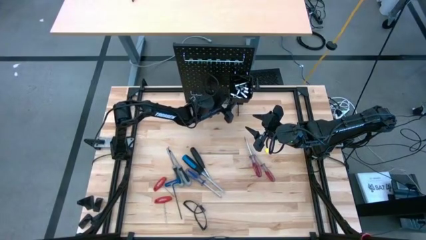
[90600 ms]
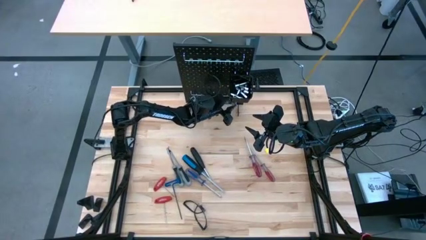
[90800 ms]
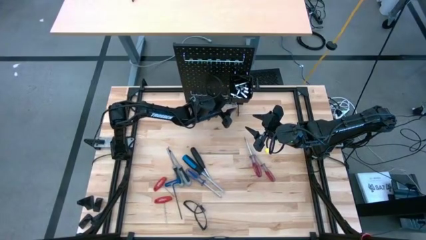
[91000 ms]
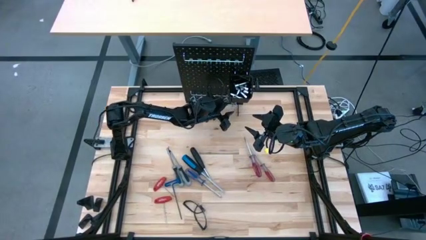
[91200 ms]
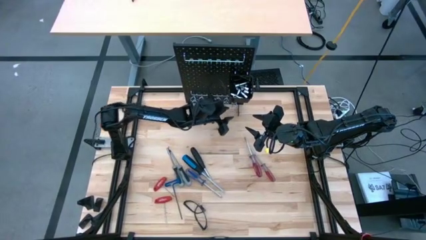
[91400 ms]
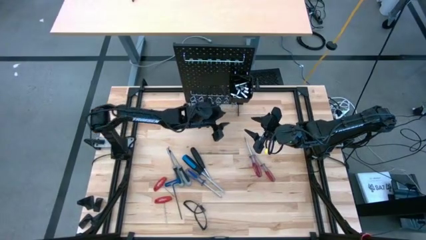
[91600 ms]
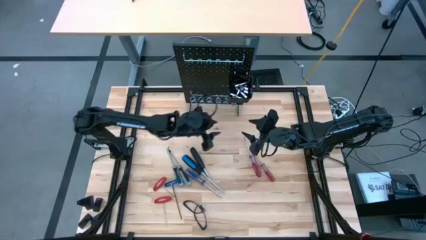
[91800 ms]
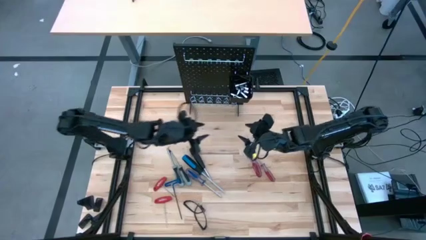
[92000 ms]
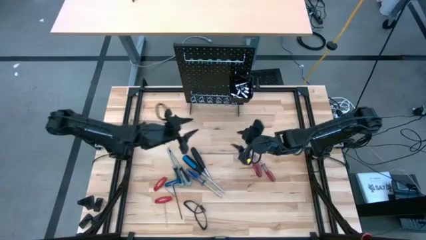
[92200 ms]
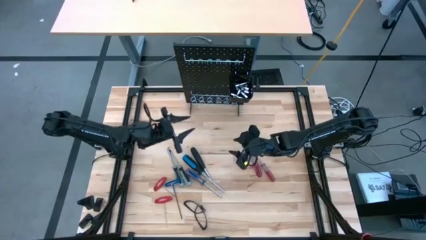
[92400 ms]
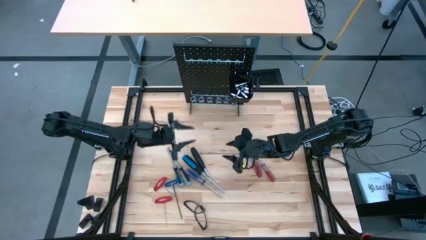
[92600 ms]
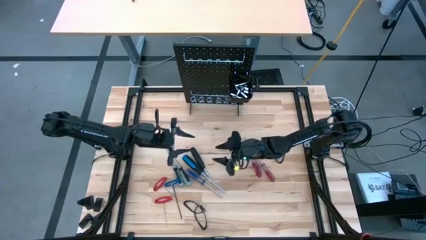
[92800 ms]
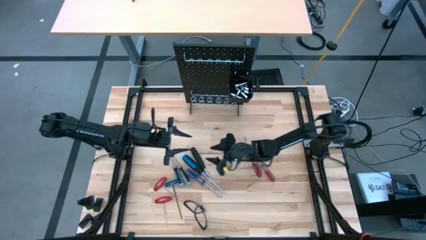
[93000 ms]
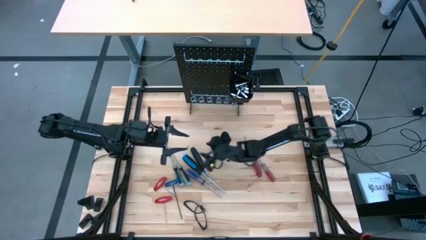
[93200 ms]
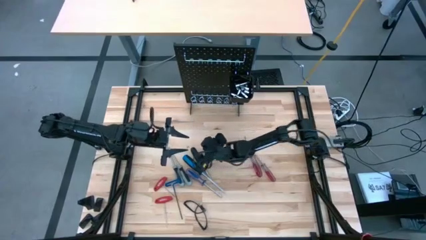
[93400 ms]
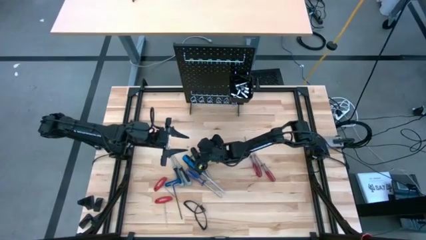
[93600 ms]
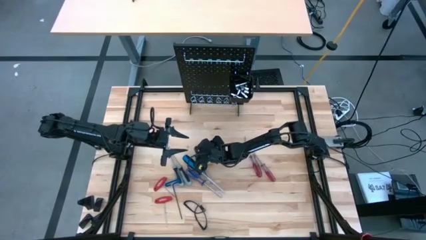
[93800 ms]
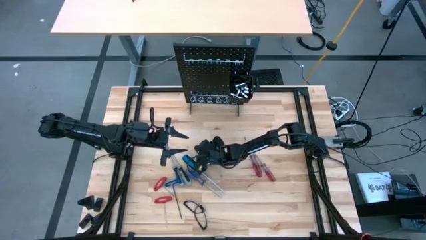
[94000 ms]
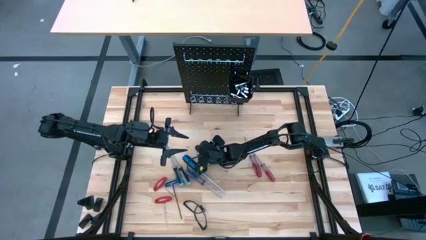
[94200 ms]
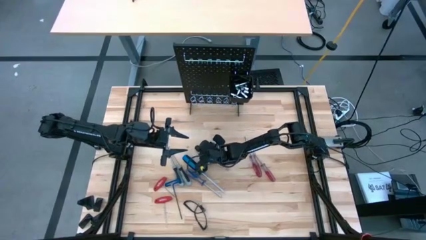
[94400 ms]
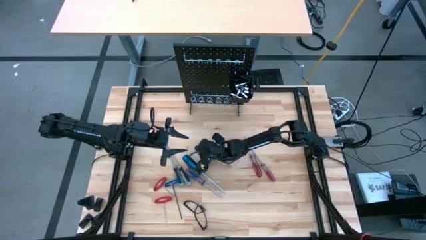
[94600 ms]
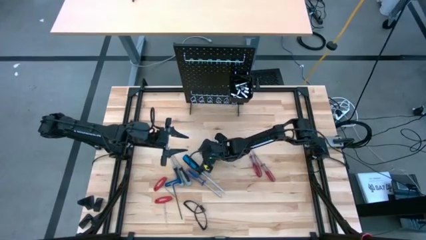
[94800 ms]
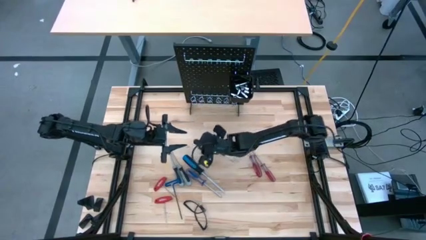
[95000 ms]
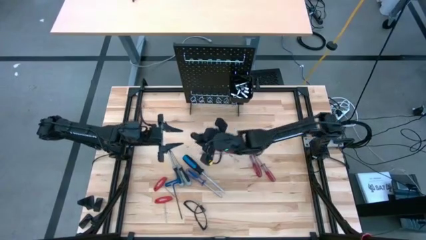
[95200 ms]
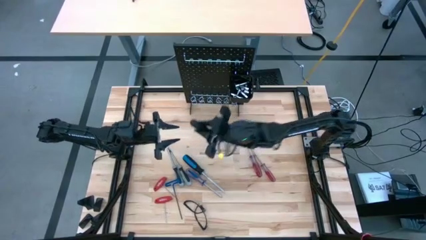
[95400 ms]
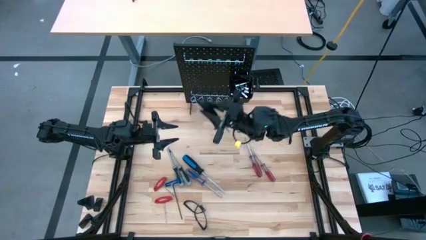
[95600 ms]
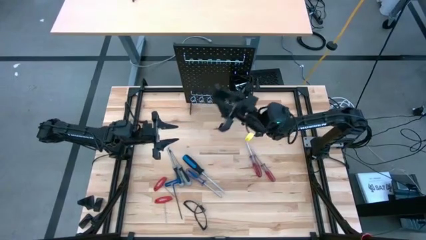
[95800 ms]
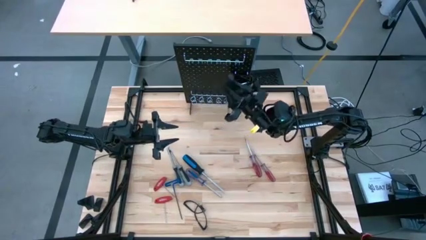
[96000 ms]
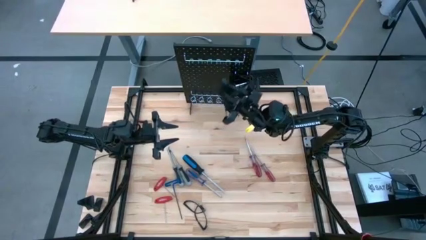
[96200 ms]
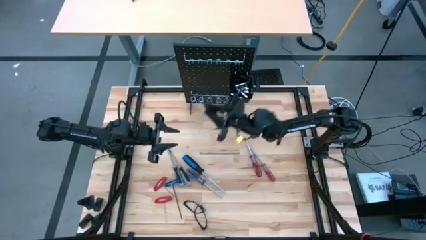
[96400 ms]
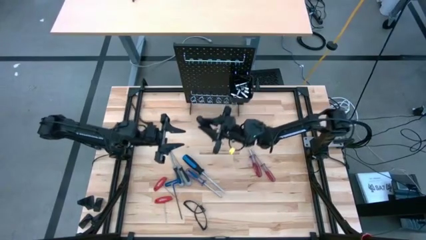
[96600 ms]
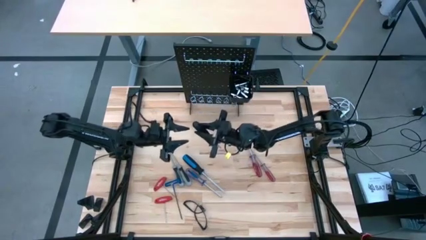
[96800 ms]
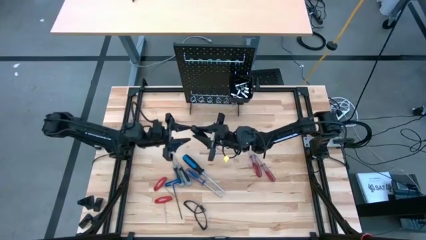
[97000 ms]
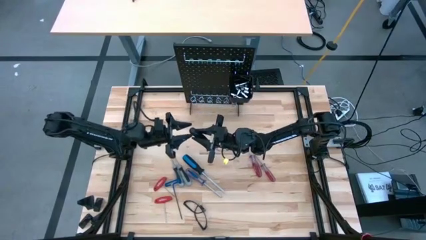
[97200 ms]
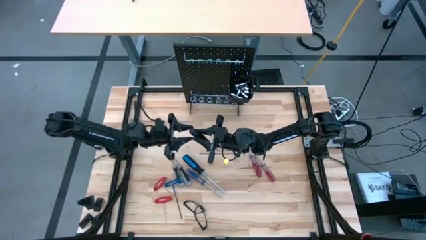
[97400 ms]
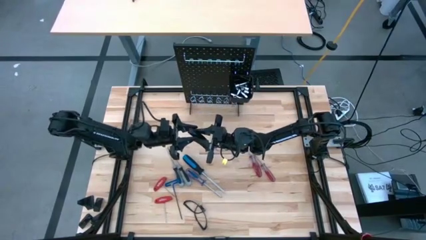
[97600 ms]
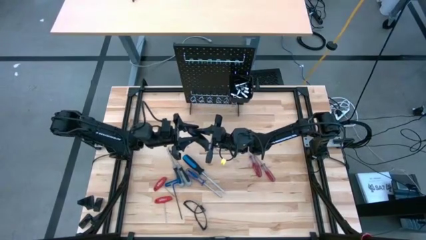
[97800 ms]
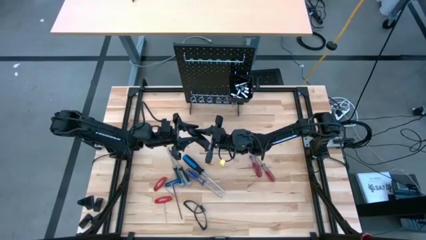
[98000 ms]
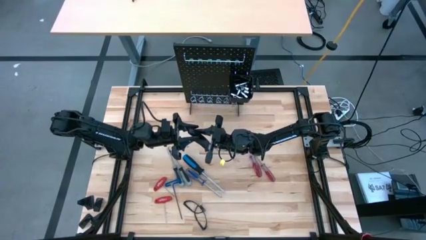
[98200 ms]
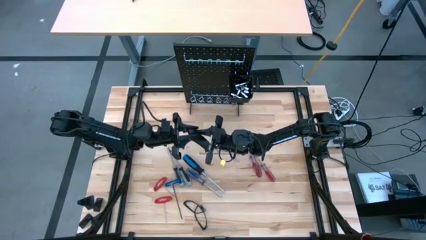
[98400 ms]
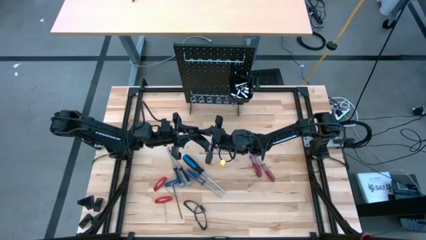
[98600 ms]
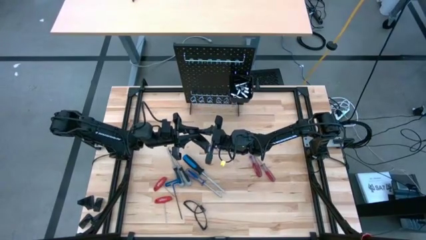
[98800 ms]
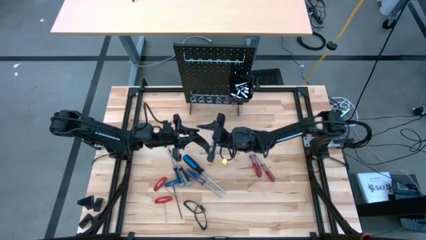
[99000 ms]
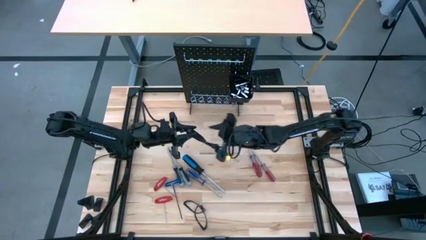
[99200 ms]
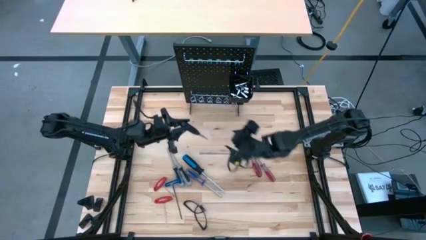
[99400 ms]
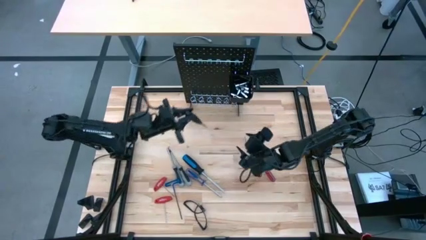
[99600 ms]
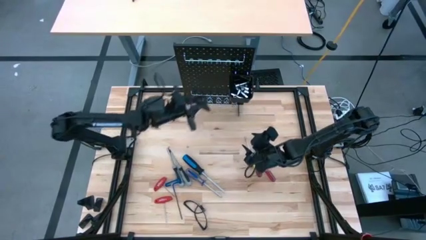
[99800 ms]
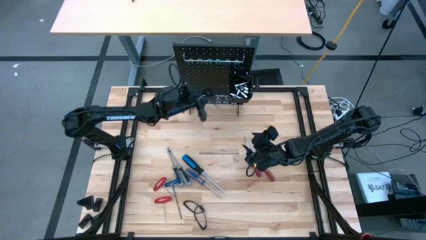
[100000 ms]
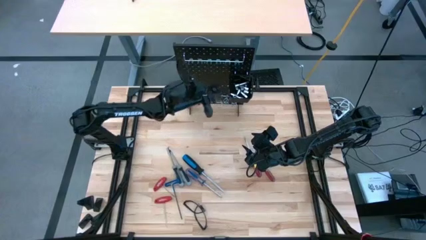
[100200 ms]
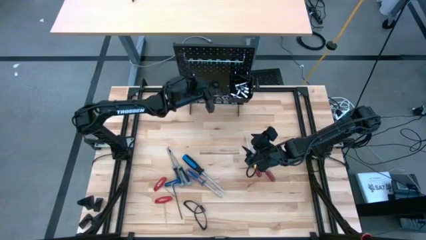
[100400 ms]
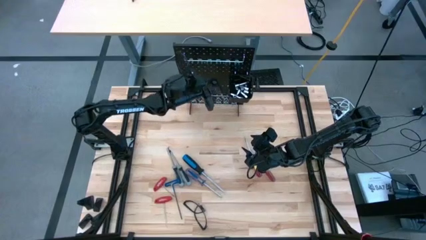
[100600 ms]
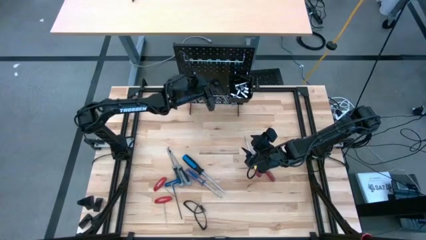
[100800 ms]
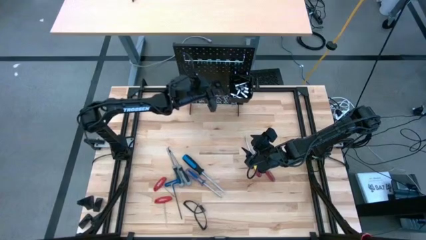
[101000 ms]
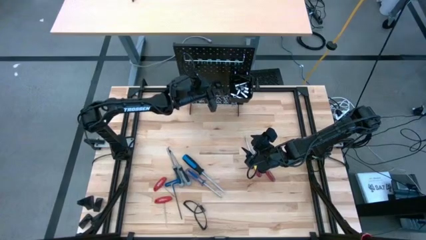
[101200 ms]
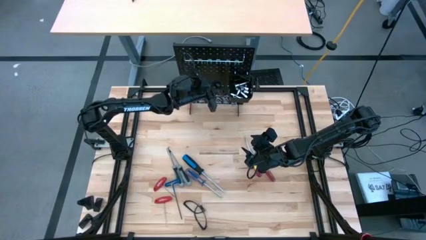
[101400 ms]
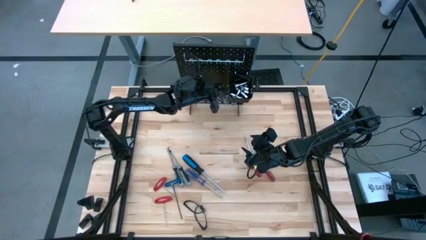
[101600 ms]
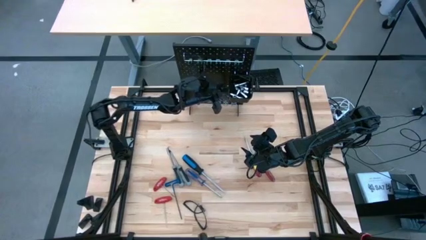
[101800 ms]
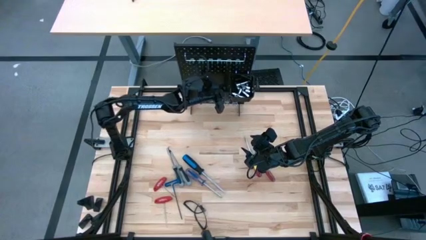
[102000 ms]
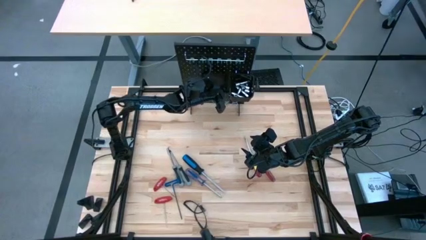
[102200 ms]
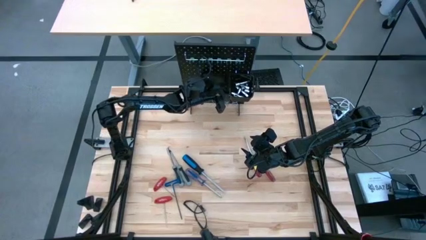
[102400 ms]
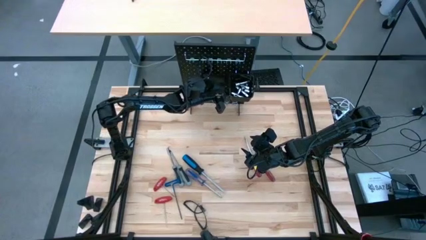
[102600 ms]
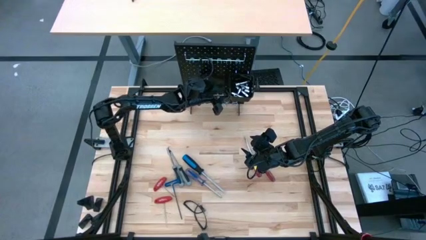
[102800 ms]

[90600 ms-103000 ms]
Task: Hang tools onto peg board
Hang the black screwdriver on the pegboard

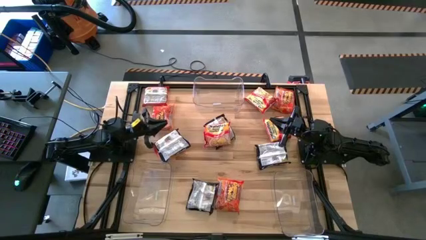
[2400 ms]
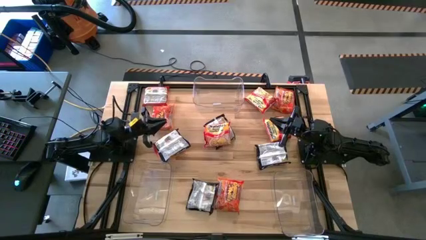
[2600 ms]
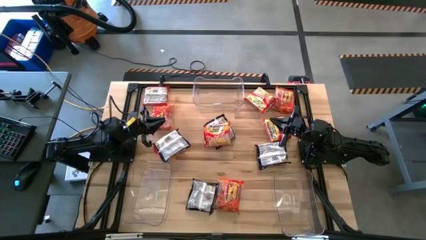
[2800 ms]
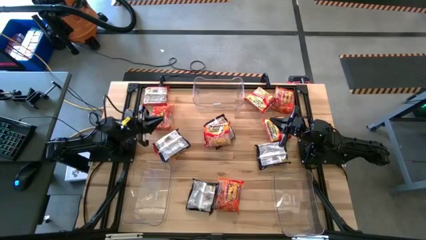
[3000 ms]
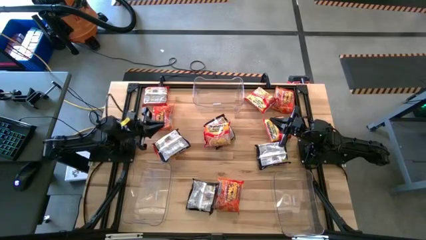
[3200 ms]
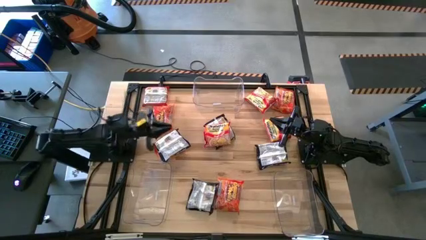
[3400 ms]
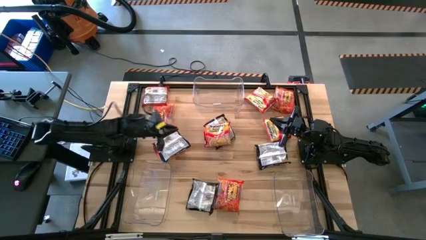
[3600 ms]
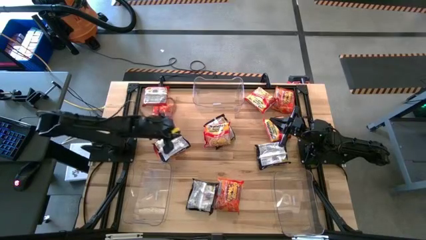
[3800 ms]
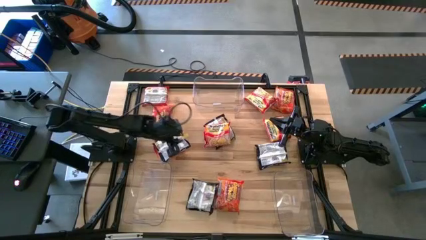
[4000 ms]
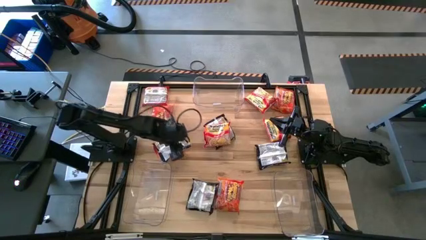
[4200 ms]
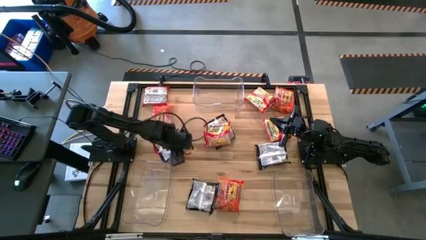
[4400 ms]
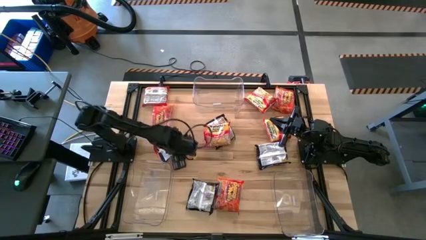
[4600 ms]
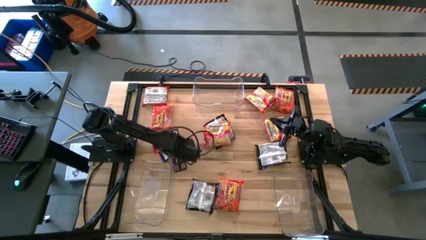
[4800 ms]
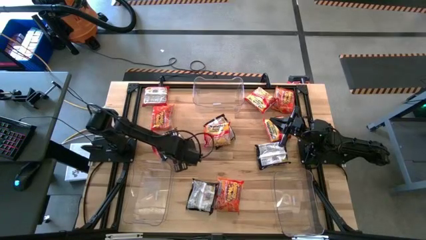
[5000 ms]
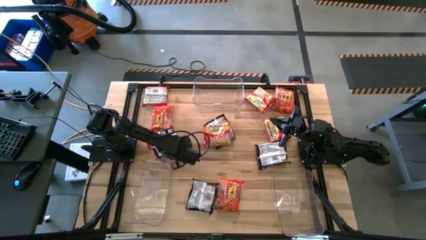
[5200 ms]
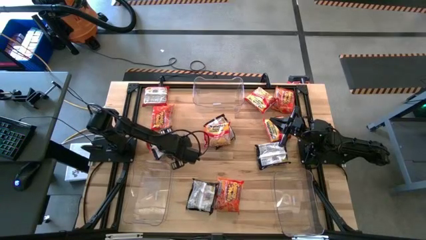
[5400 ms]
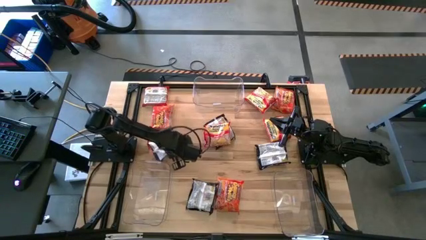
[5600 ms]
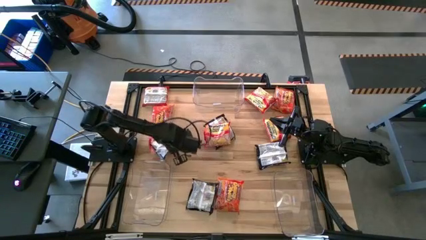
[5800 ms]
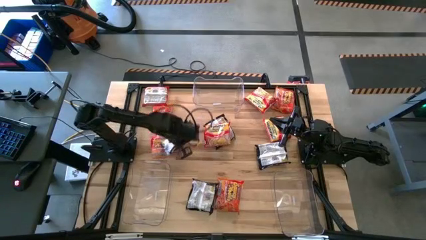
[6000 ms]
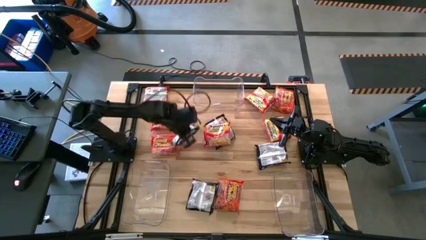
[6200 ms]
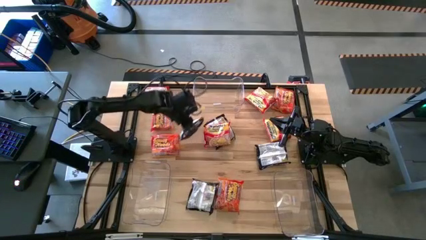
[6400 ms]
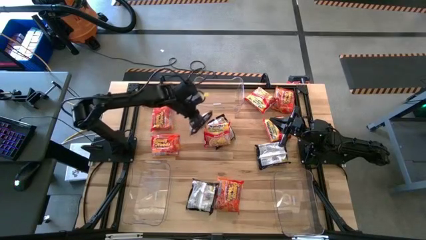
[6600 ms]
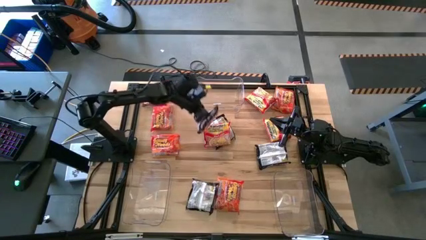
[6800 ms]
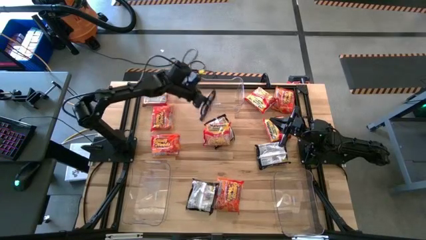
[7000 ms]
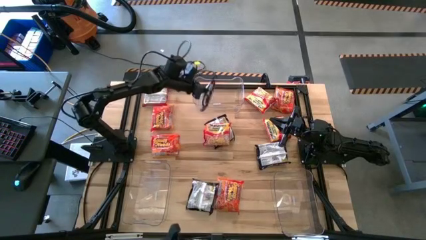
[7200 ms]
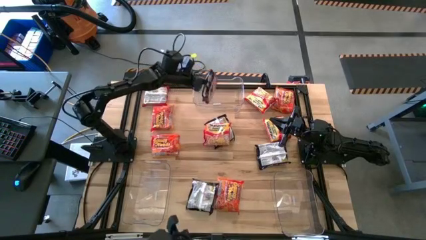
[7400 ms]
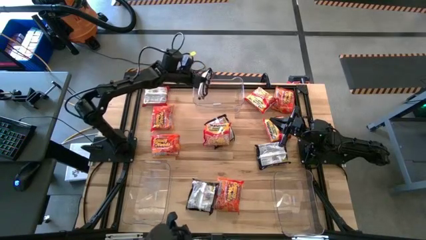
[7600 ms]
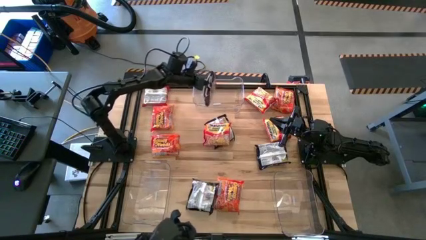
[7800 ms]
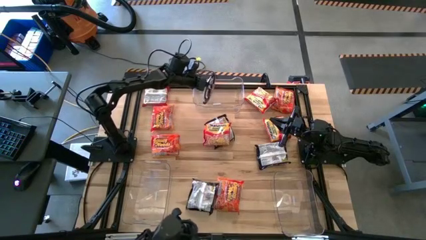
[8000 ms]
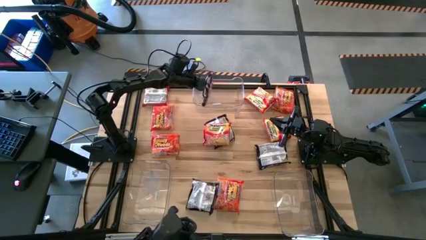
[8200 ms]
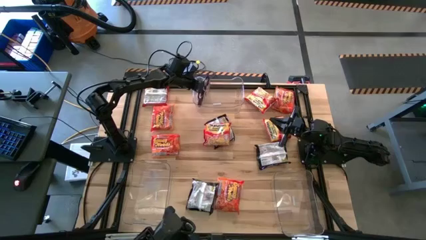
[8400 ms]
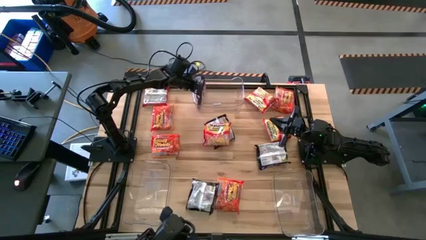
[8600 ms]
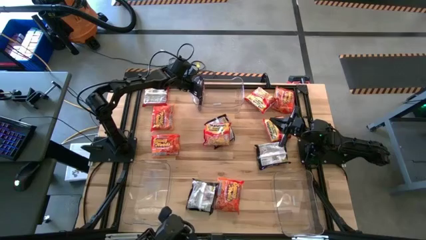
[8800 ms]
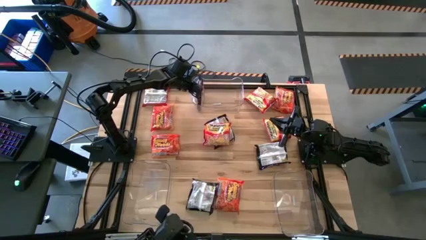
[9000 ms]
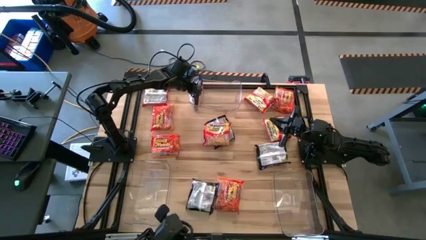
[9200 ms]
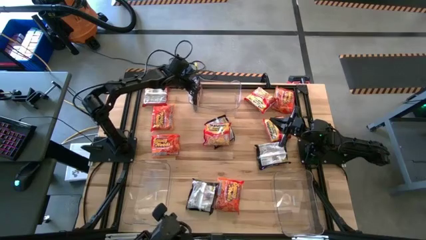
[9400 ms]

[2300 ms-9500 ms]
Task: Sort Maruchan noodles
Put the left black noodle pack into the top transparent bin
